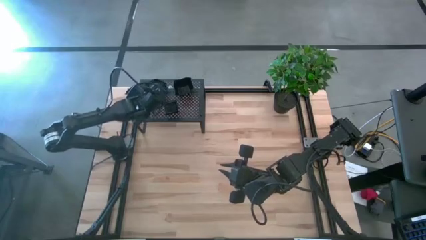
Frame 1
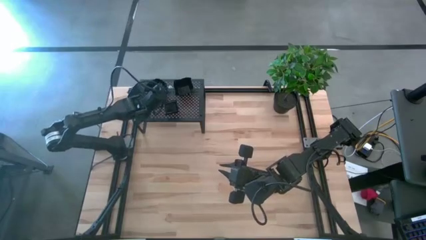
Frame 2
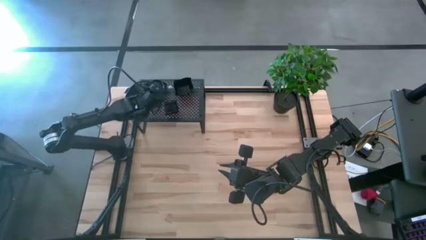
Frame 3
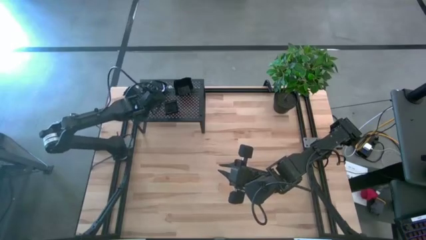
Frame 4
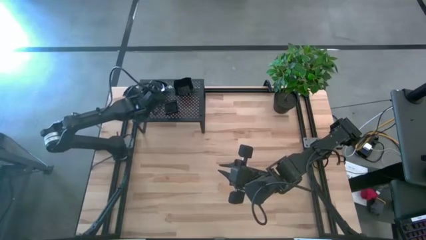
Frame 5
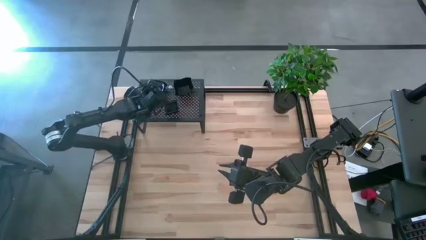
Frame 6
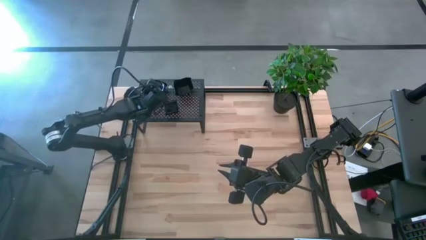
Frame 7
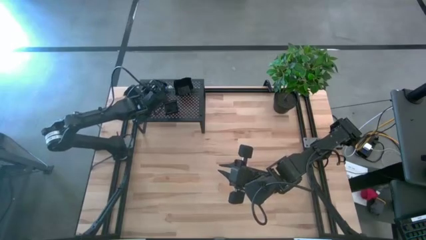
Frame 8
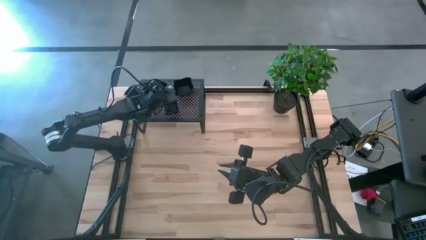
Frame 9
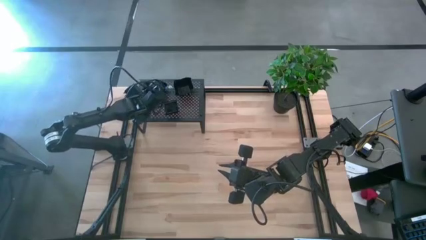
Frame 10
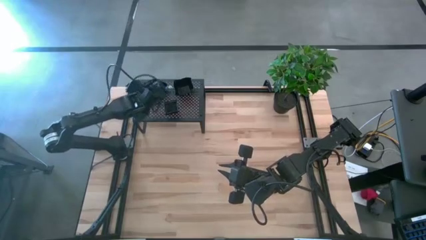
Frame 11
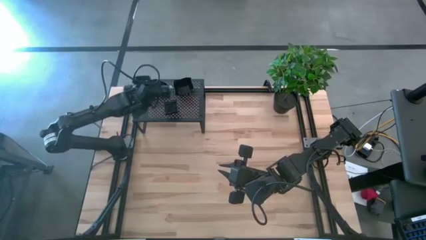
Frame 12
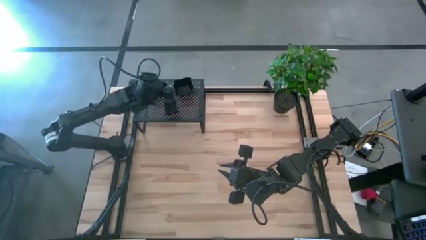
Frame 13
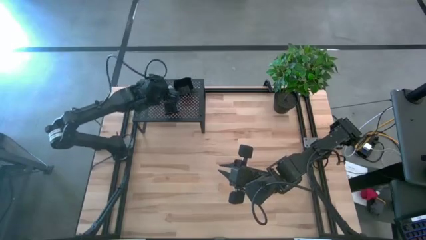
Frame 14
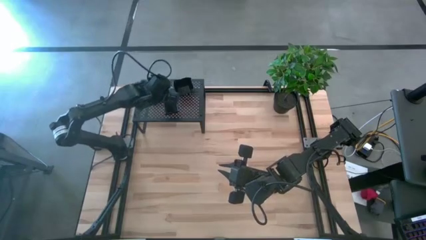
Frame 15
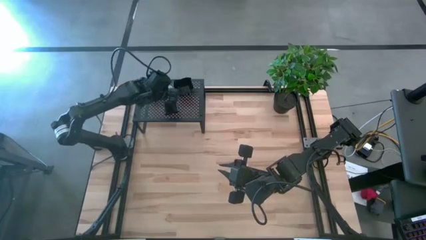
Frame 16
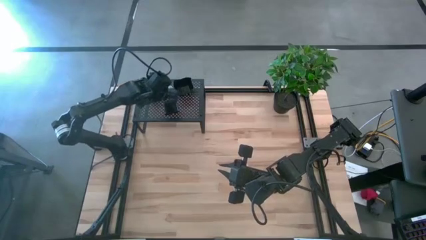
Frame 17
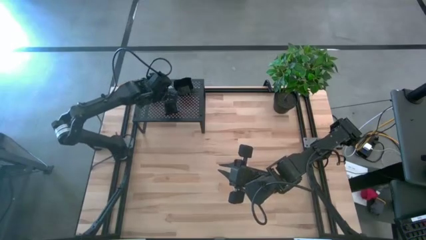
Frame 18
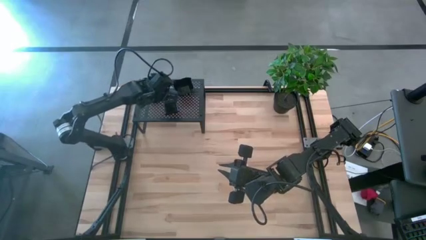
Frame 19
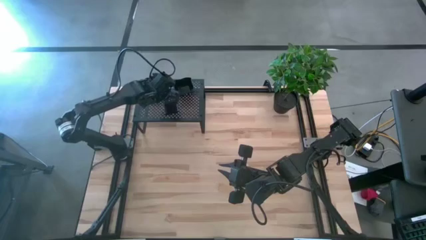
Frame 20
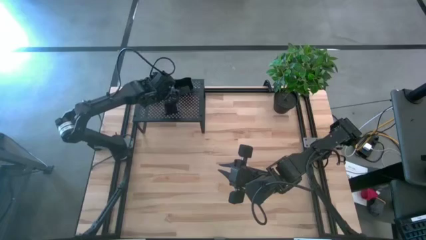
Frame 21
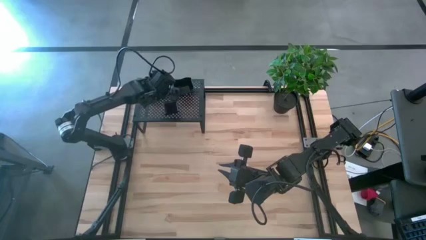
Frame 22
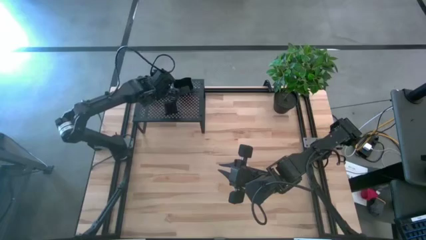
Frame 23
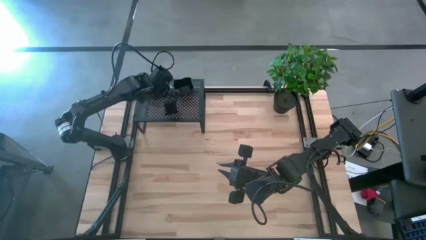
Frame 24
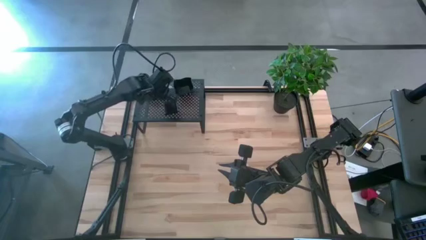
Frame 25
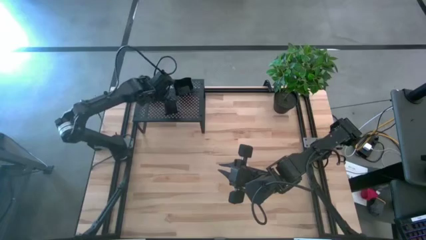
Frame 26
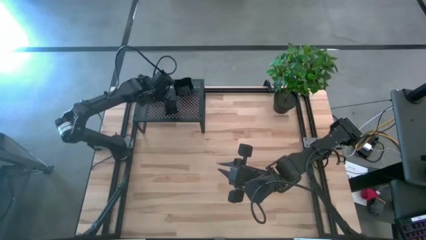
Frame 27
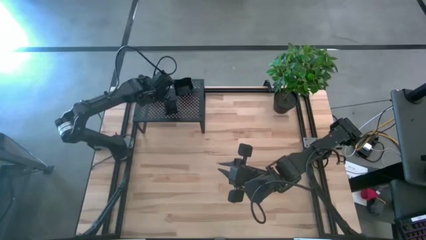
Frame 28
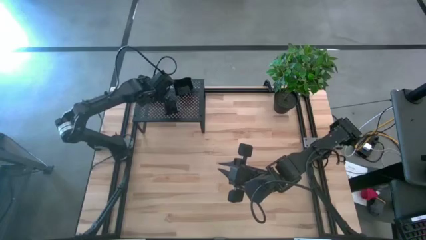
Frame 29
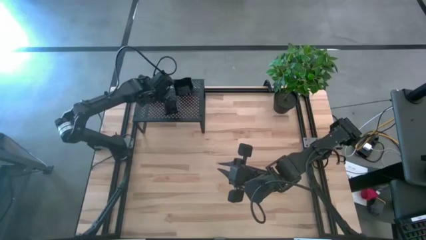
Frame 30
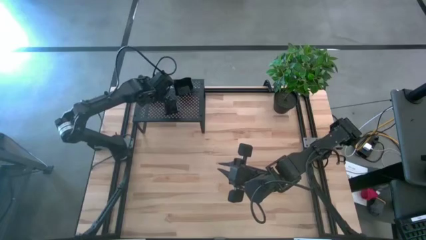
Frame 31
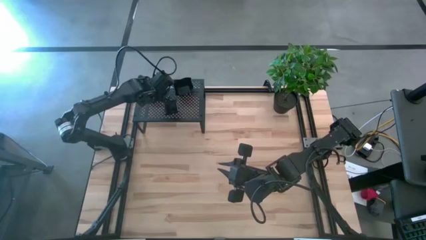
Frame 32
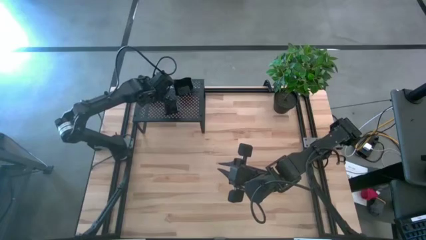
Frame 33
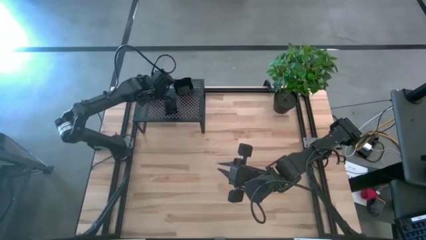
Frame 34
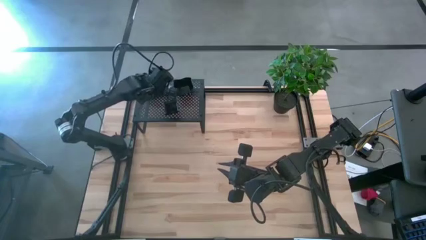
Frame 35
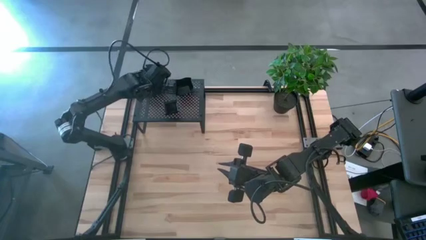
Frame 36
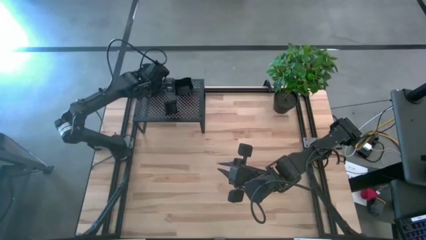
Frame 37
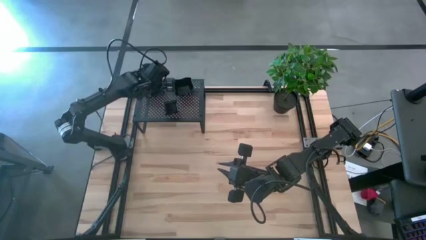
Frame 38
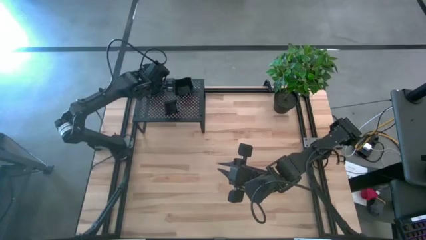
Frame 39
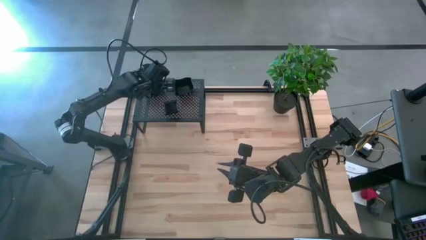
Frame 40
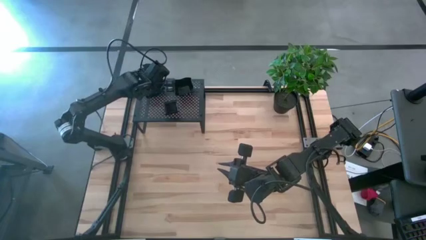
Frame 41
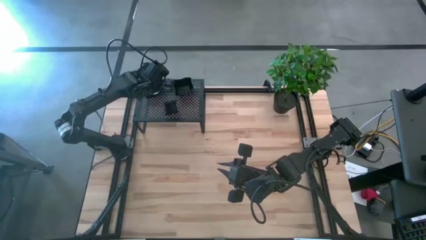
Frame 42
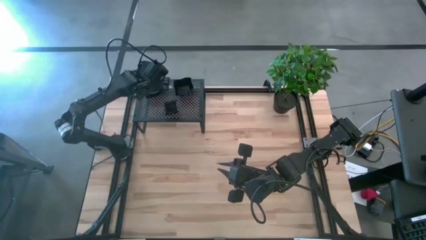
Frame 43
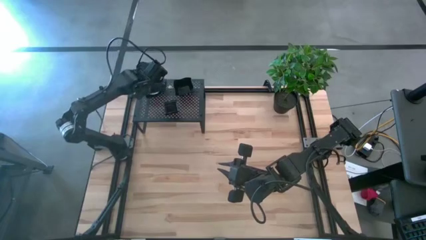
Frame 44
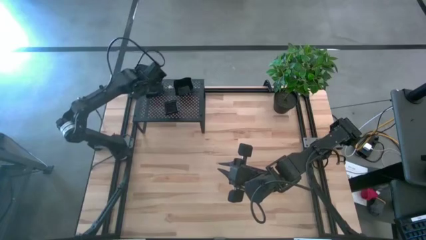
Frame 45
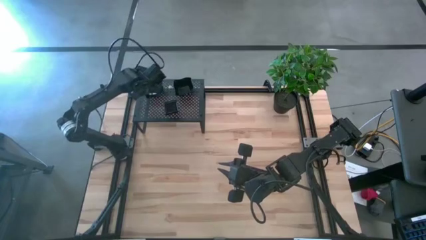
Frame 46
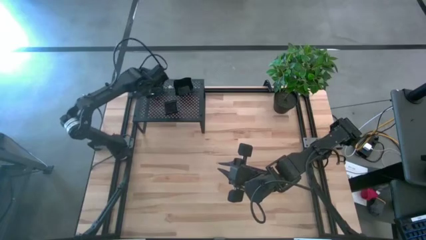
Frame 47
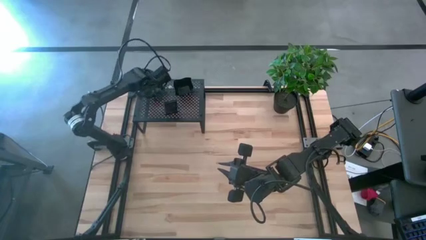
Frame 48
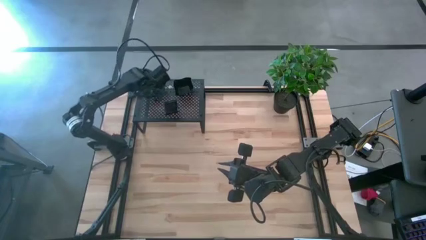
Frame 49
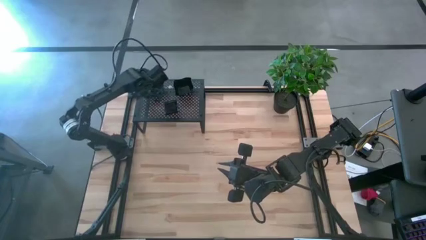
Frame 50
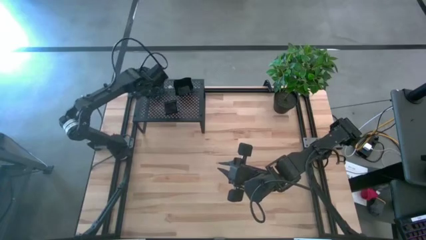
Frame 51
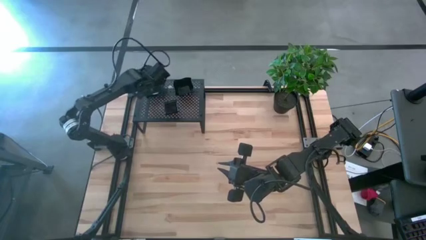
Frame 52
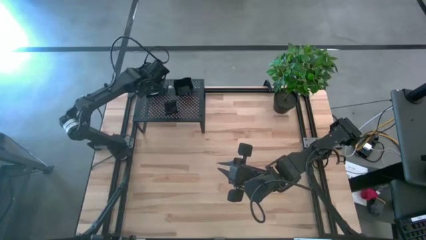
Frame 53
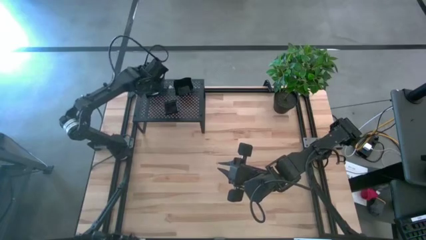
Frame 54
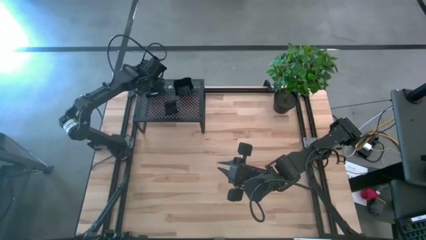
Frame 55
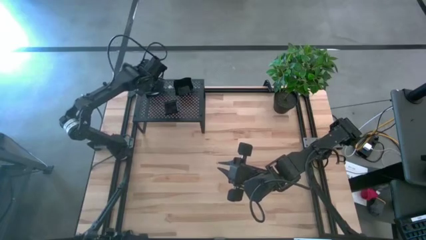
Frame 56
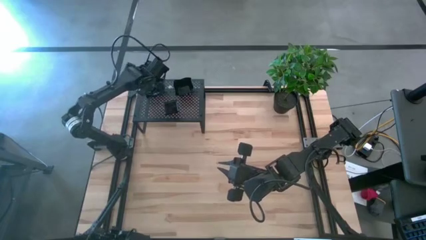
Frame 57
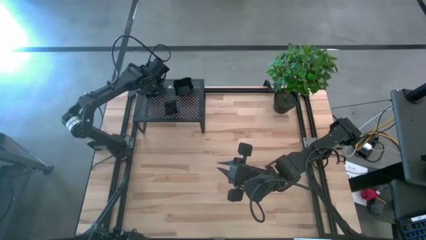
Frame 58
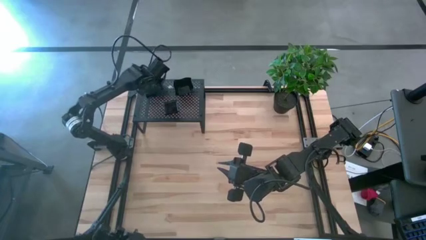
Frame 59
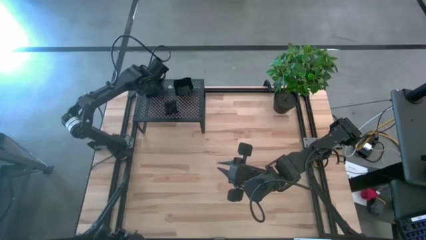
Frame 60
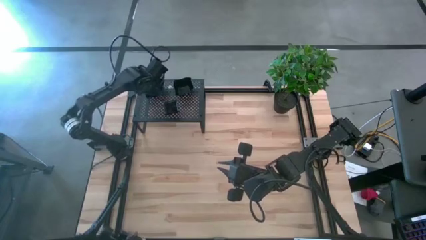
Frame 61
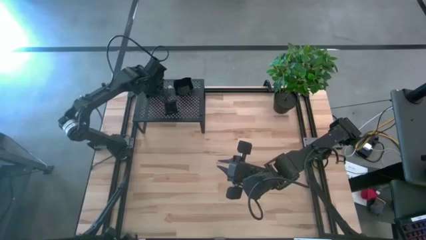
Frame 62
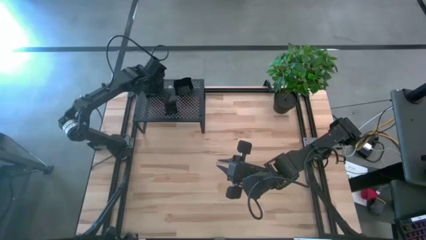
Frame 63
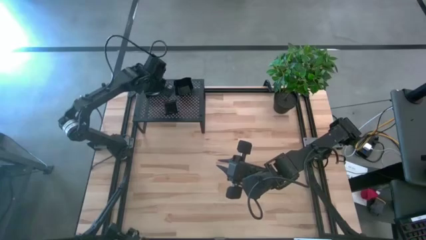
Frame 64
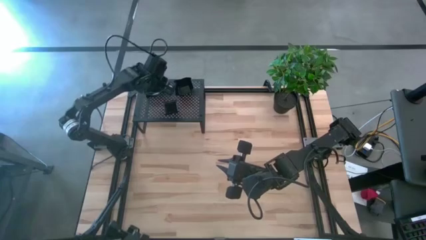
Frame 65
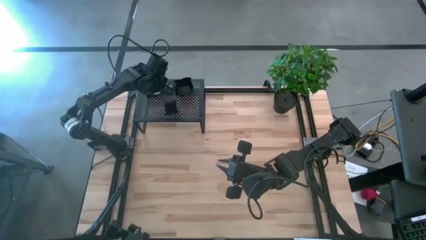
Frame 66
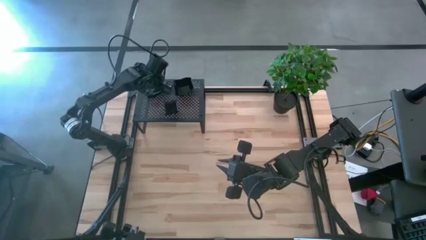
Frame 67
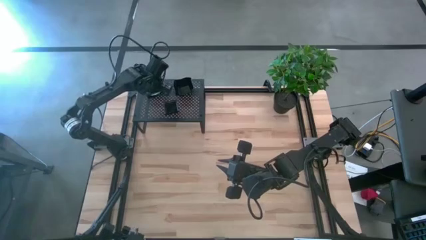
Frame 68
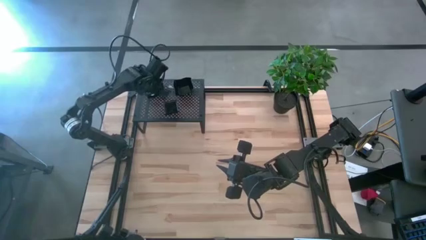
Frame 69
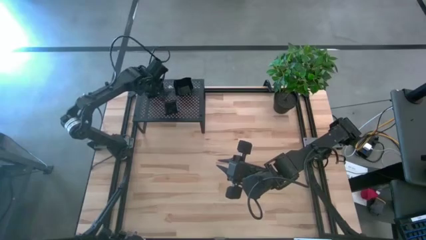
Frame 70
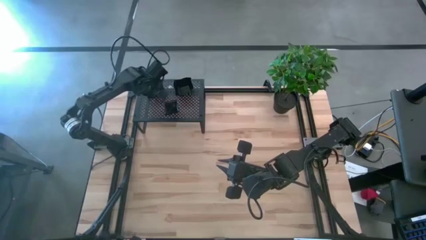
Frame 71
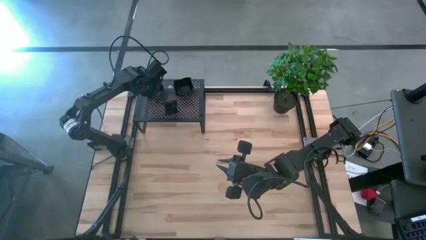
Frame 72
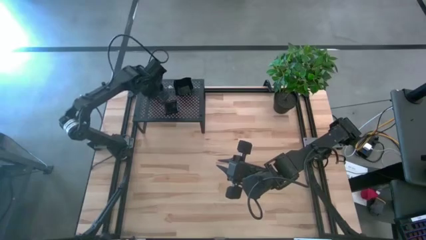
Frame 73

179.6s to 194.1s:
Task: Pick & Place Mini shaped plates
Stack the leaf shaped plate on top of the stacked leaf shaped plate on the shelf
